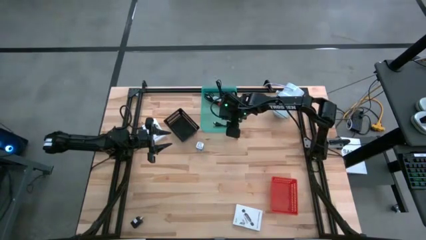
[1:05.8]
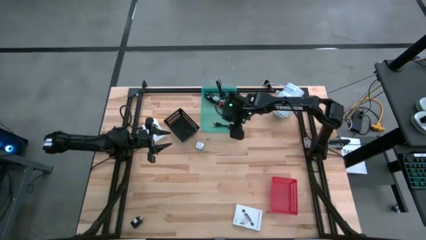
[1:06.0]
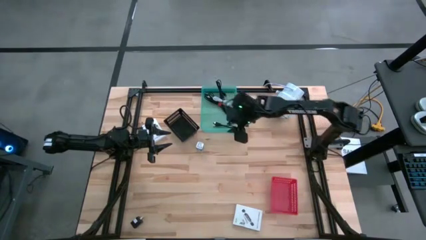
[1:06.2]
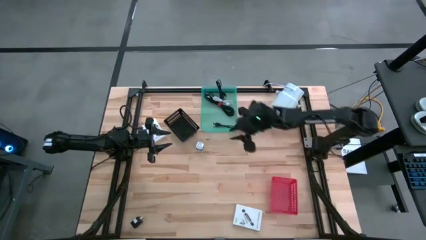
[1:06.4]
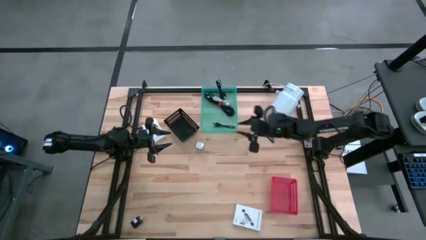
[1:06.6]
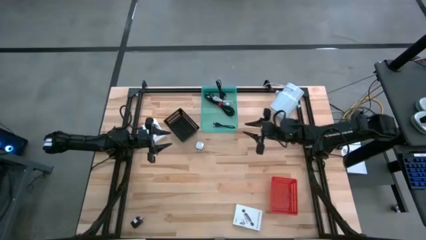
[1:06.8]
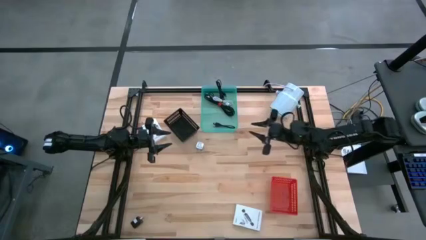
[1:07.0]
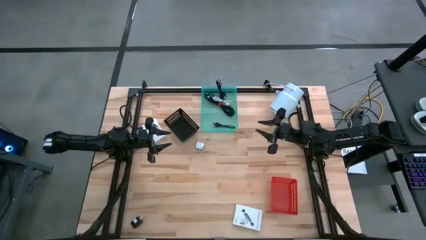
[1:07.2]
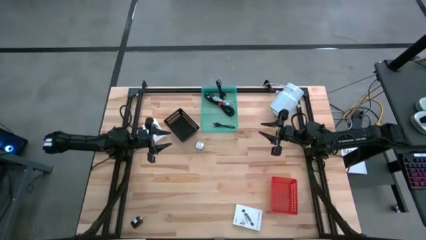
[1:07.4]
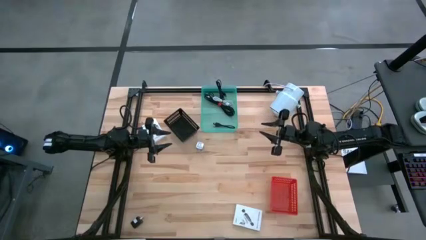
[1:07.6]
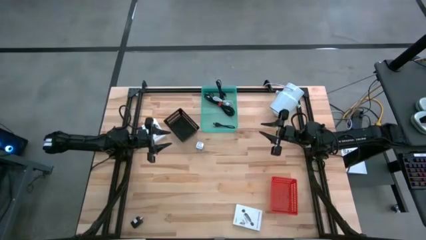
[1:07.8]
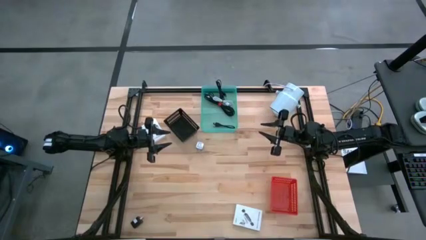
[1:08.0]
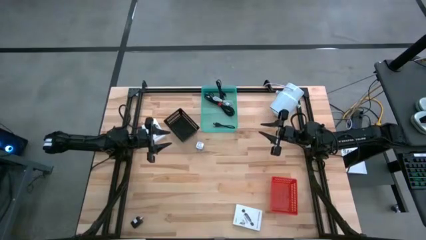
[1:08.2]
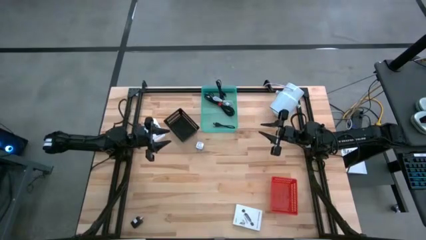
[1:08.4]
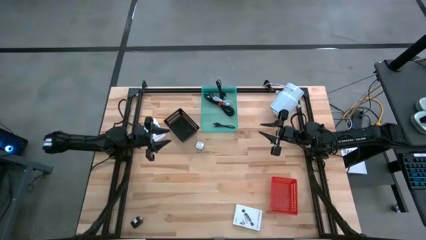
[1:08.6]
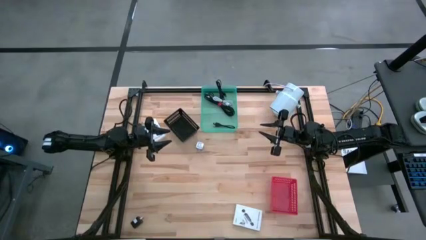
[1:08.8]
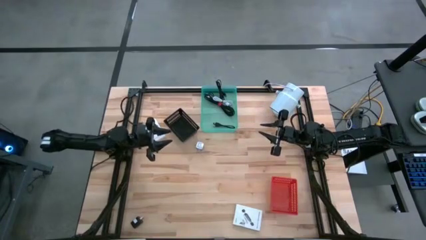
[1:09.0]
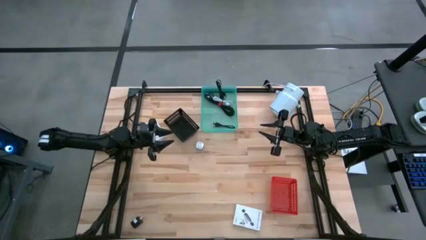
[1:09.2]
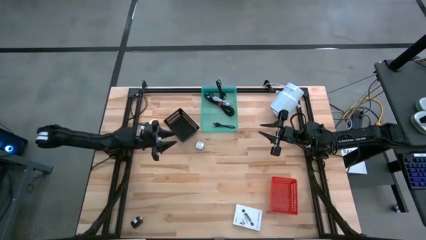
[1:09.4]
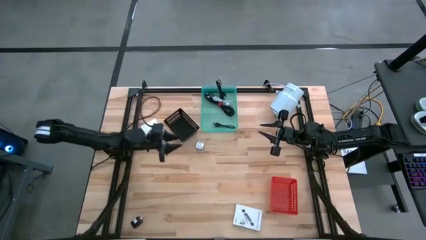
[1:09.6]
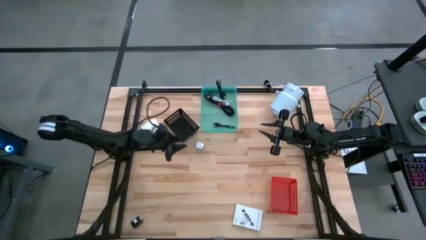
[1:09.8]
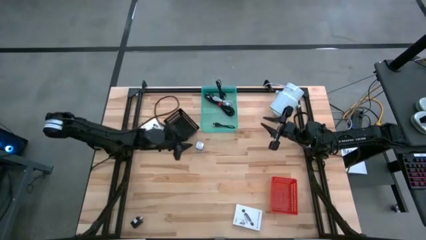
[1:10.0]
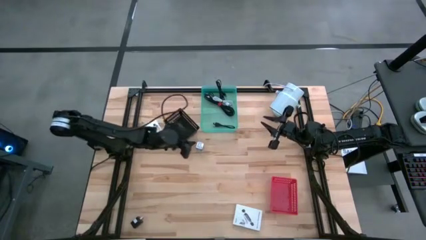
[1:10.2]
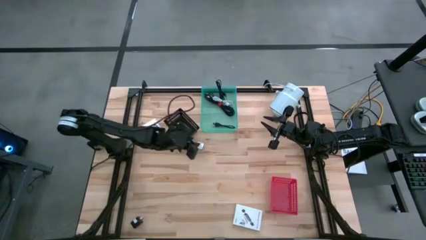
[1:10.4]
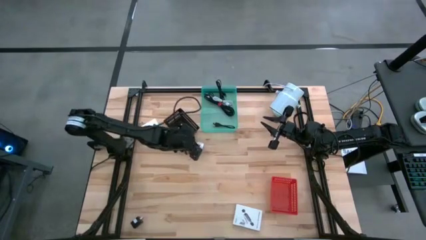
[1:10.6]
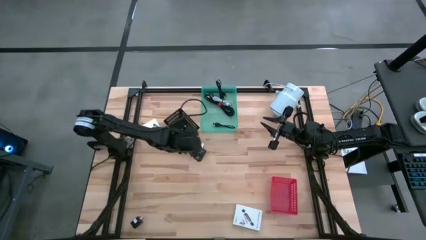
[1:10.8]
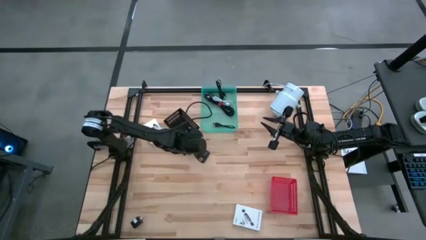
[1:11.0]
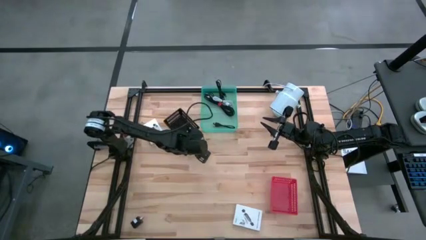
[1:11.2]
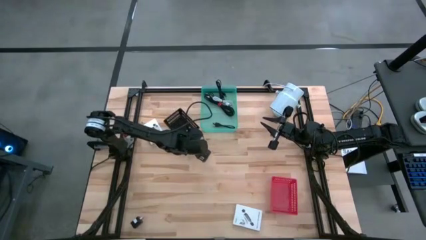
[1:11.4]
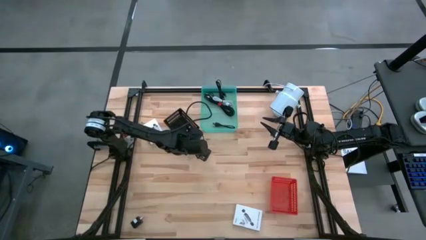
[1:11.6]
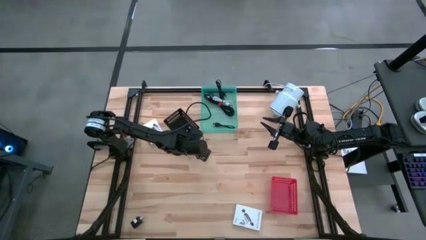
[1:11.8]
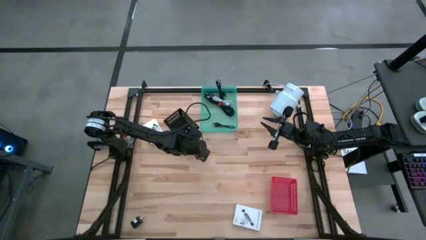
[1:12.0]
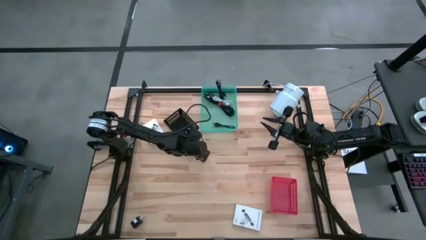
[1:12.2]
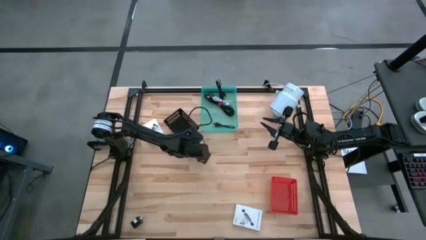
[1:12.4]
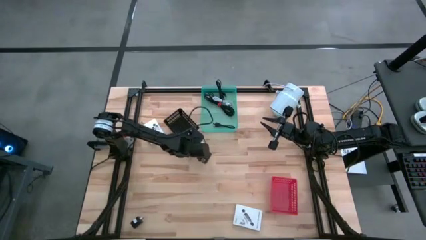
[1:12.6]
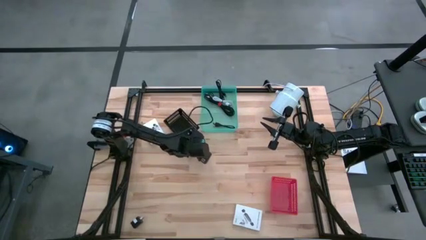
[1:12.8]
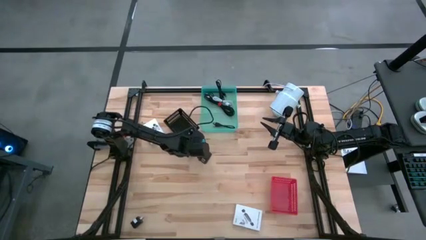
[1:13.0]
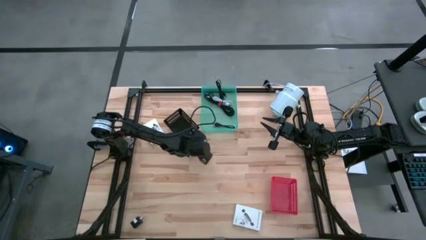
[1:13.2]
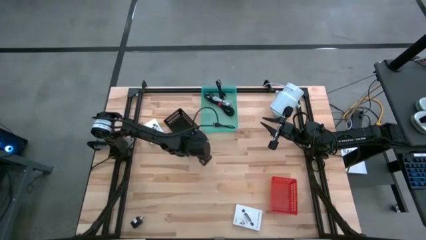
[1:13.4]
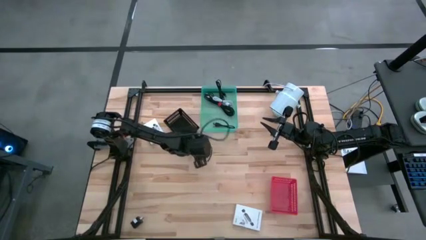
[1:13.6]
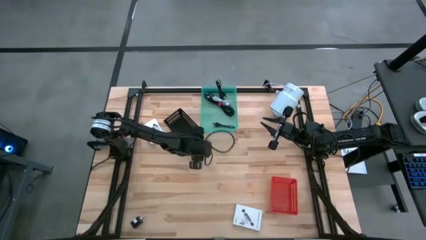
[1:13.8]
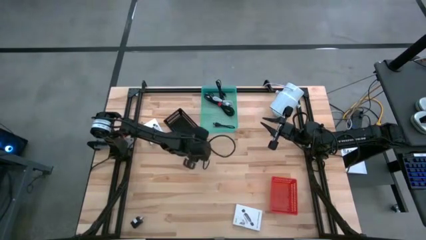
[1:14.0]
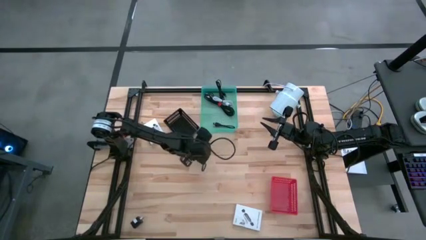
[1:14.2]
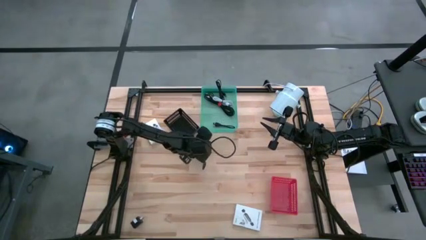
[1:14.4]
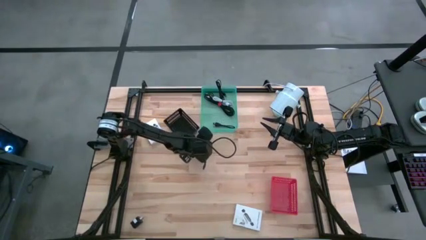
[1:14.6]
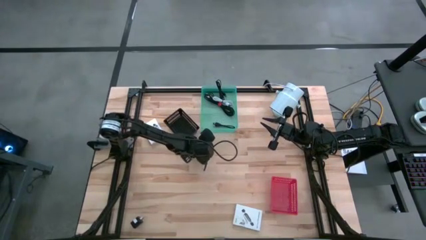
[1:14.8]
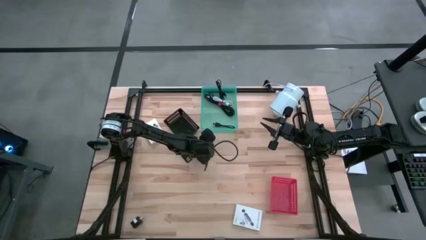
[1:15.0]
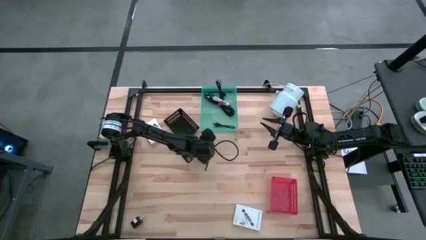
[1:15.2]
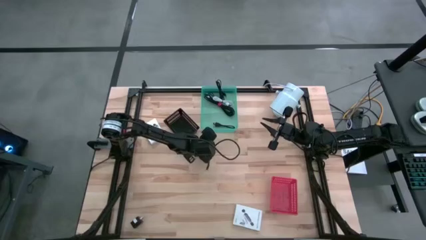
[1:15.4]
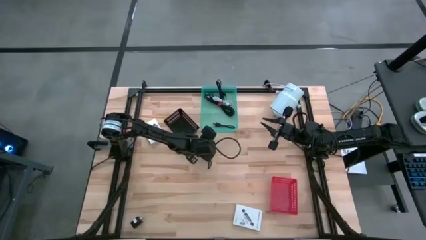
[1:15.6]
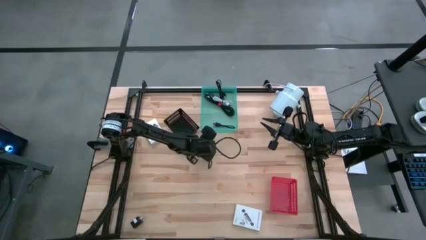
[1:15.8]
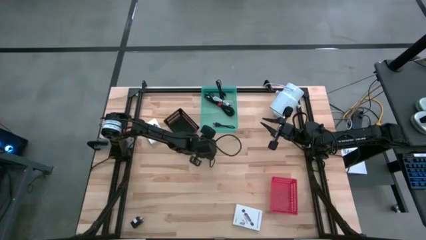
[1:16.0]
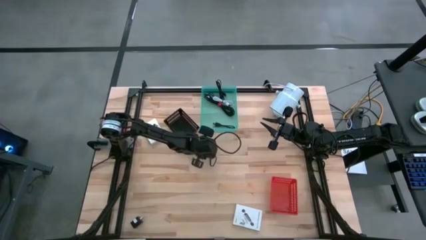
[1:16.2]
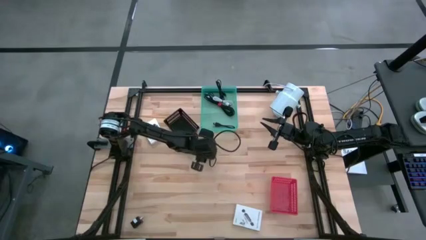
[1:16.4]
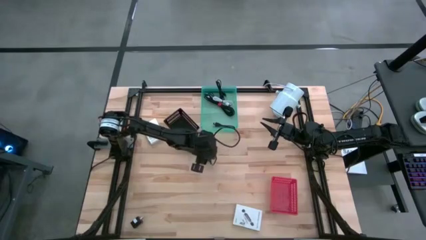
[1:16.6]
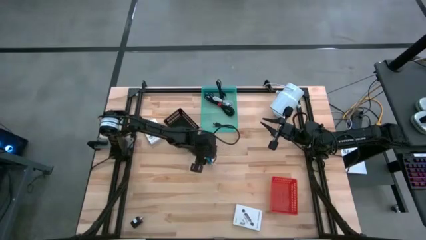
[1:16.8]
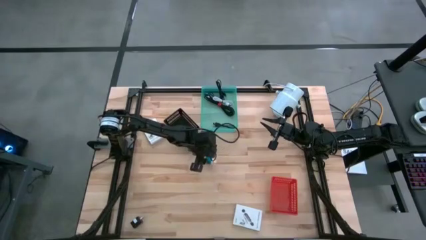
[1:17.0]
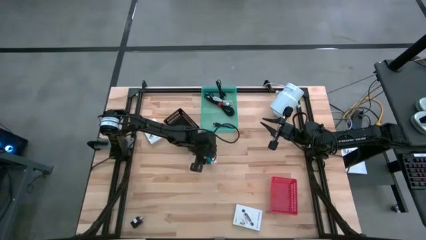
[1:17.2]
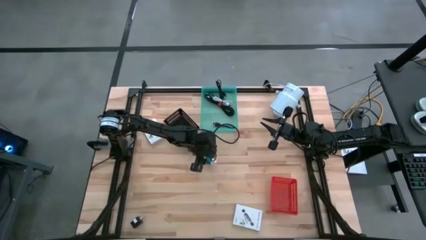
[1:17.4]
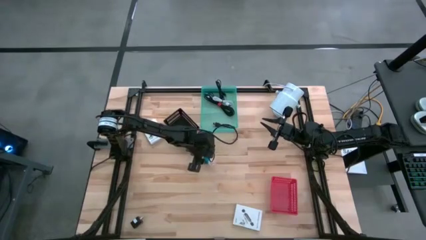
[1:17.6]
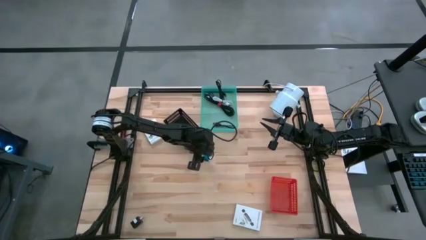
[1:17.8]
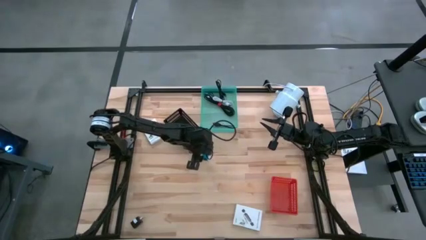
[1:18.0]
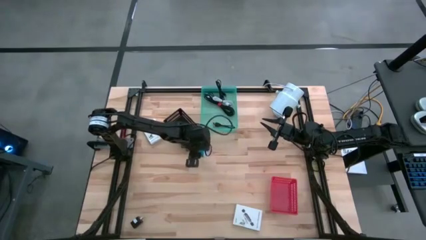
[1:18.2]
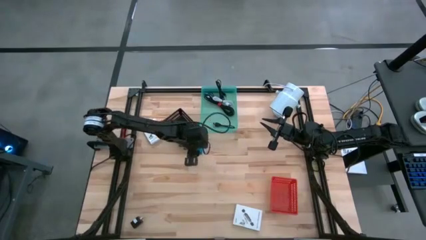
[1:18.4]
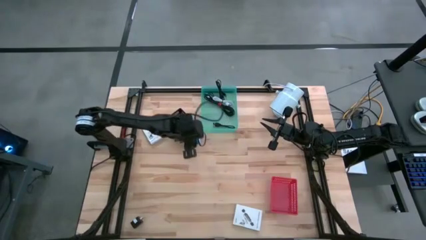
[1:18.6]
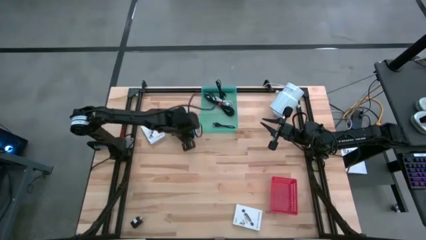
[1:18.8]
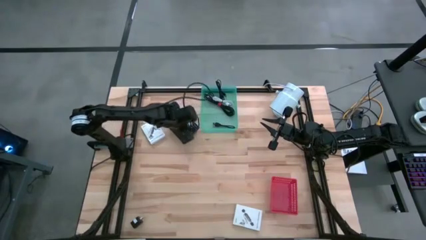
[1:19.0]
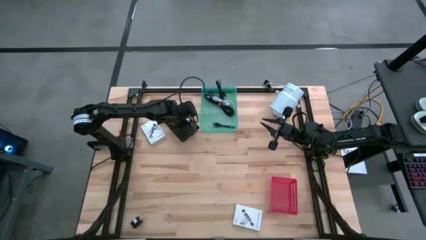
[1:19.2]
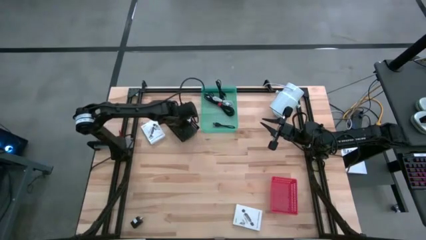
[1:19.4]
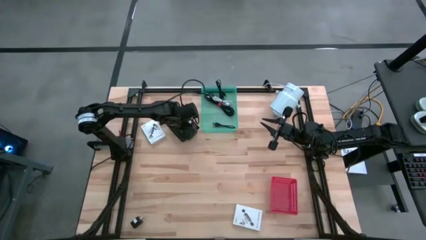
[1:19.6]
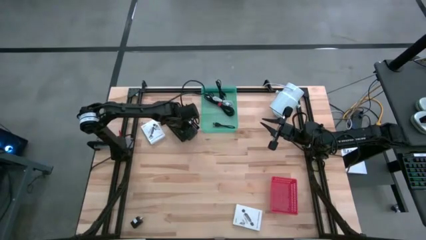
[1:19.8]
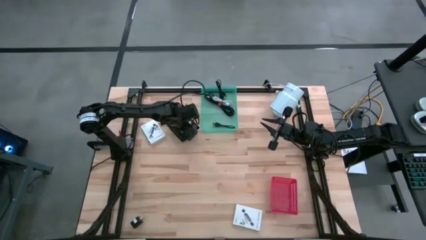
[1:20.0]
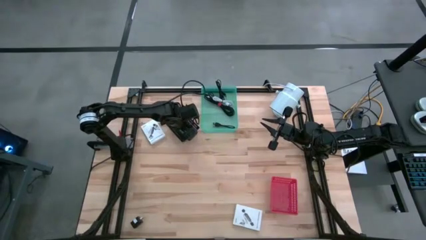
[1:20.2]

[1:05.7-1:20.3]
Task: Pick and place items into bin
Put the blue charger adapter into the black bin
